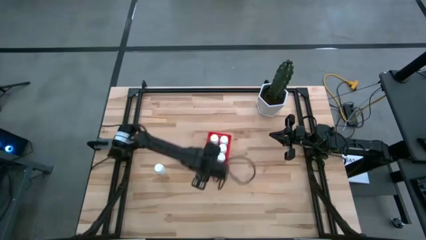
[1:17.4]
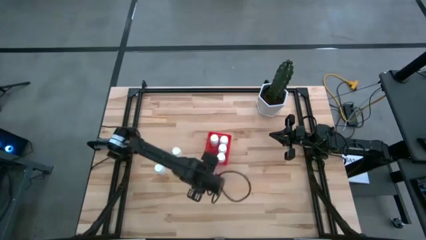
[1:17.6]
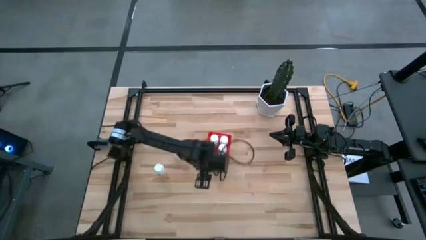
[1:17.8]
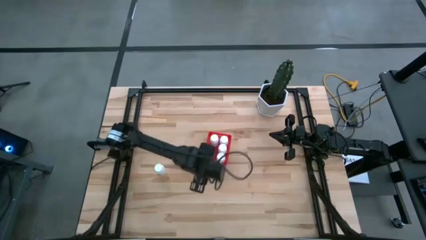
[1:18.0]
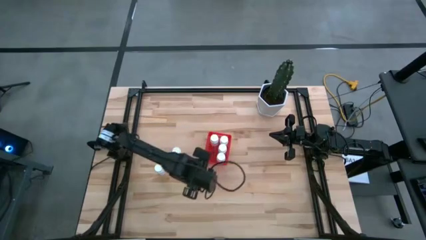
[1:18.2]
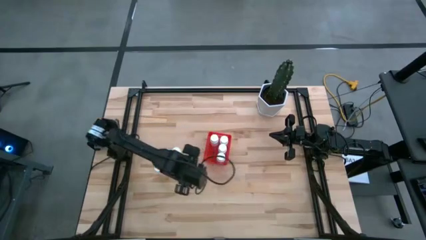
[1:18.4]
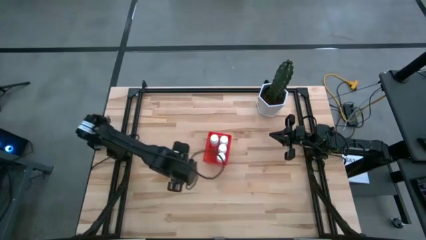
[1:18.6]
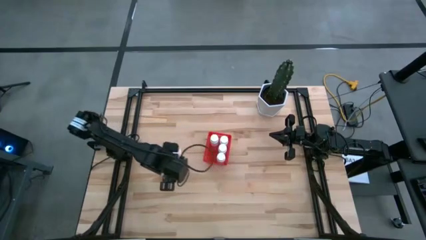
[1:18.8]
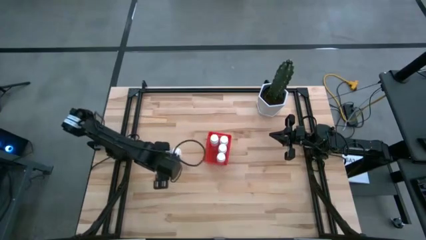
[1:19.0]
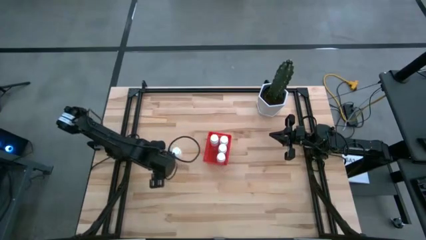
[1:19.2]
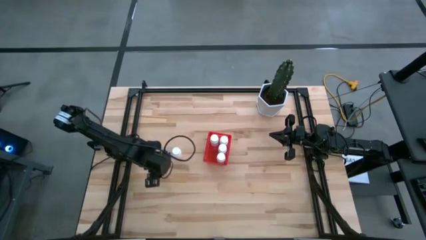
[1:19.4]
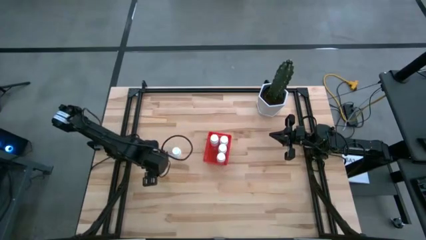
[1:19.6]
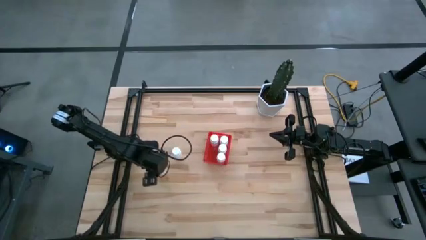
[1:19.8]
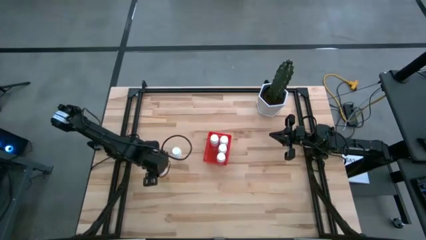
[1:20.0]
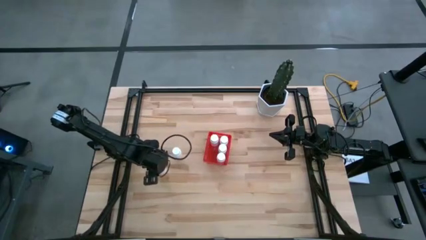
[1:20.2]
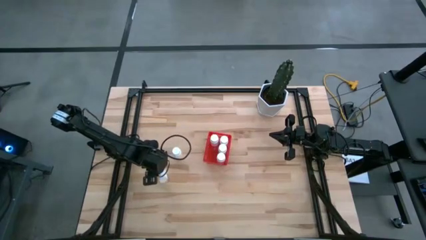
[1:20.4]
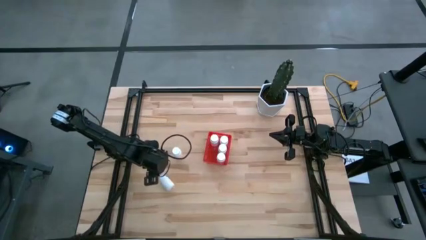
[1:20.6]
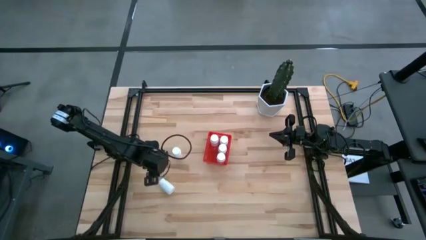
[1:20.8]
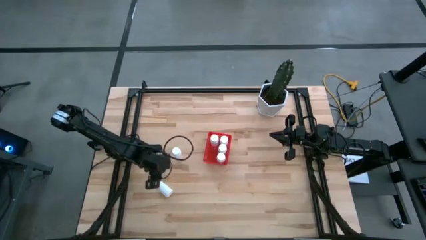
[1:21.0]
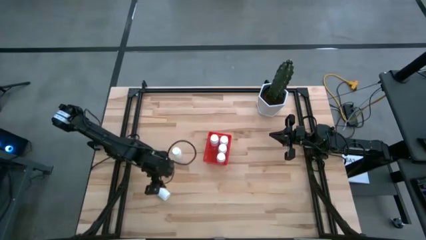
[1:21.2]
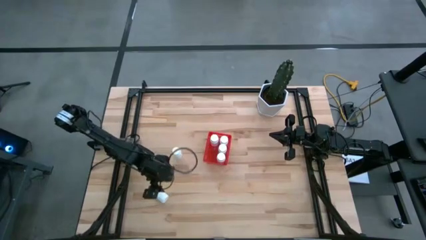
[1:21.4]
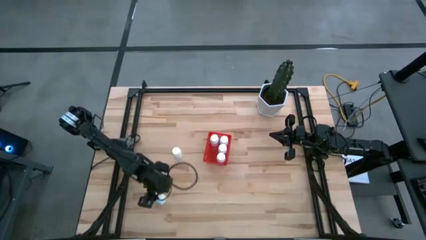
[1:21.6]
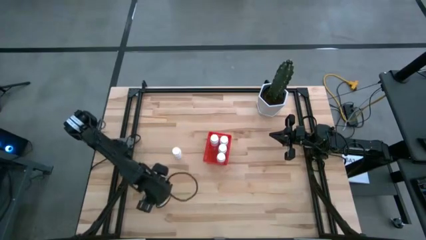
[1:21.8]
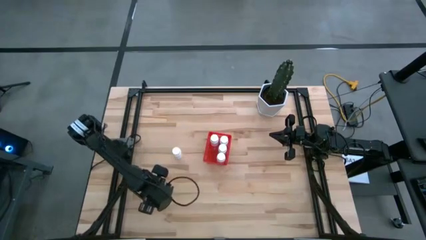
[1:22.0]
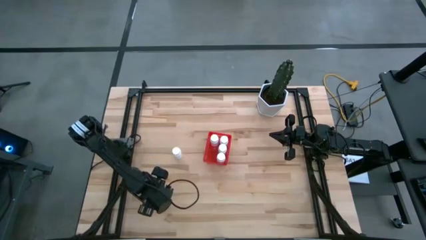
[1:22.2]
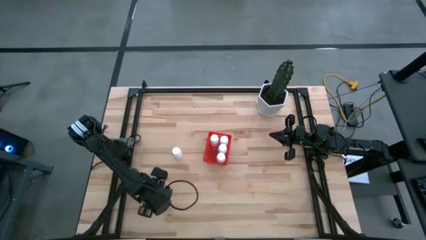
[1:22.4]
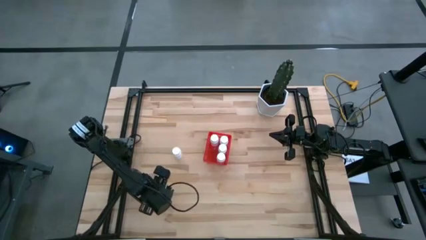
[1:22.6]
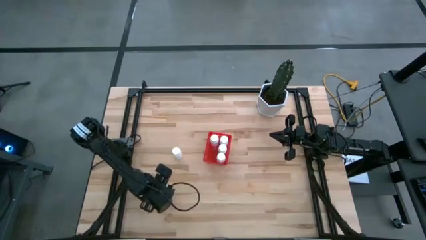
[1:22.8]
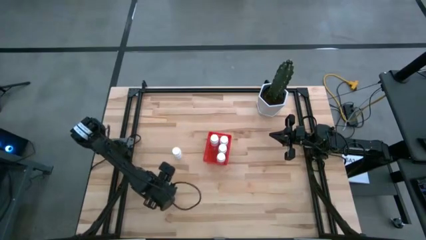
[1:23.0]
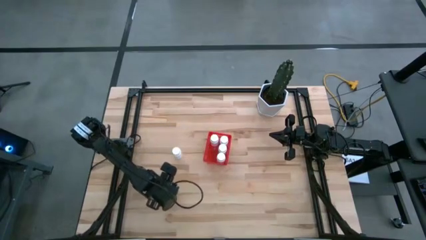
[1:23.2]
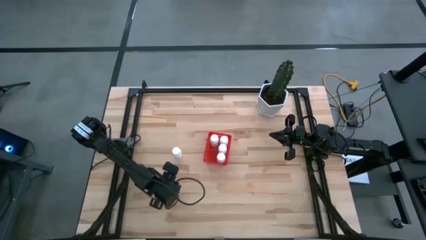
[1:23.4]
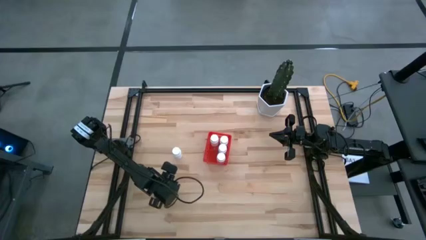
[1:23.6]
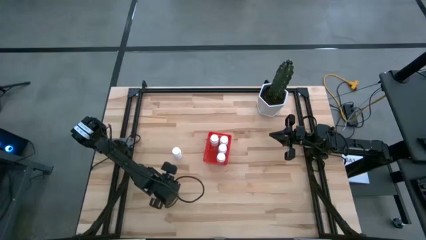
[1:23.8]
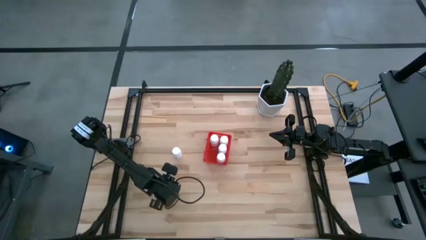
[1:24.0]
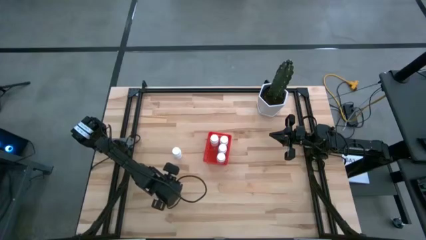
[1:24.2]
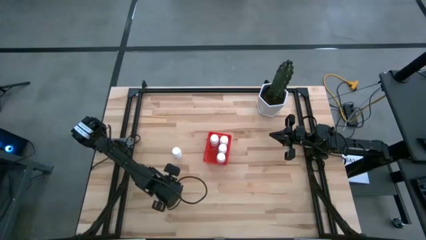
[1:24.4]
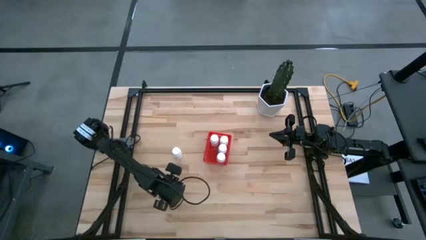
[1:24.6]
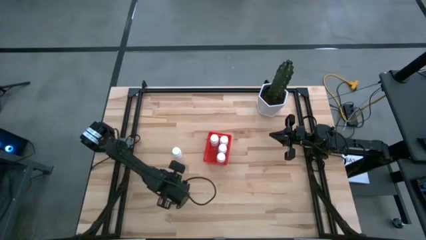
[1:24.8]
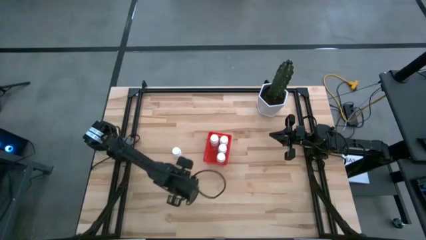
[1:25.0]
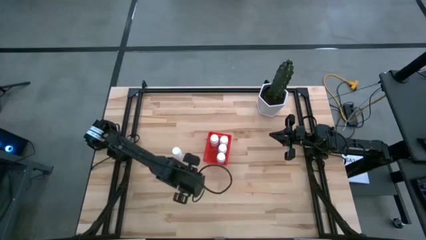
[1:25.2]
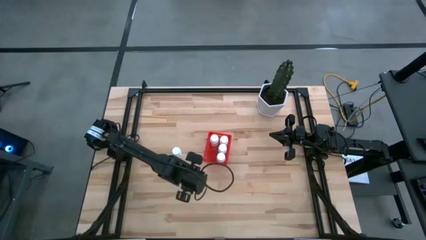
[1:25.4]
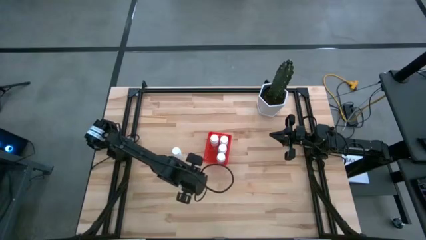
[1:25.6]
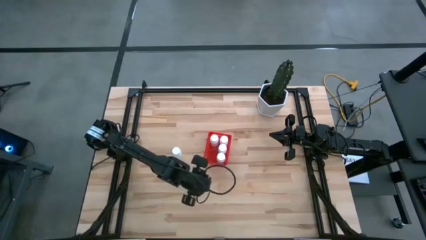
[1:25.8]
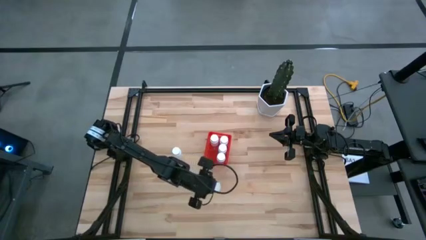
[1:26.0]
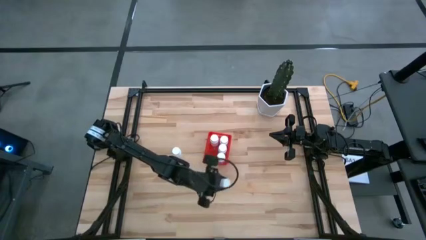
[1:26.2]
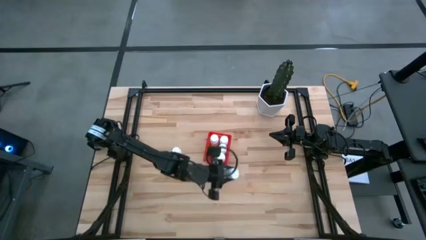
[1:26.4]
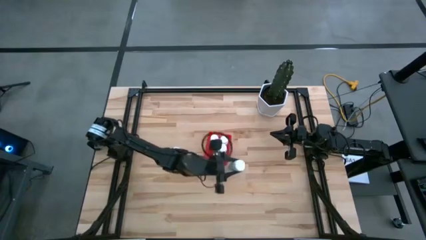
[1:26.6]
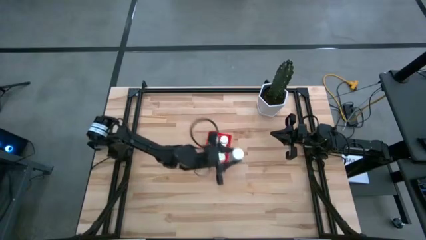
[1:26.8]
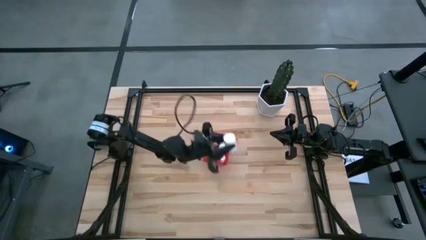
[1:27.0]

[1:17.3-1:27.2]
Task: Pick and place pill bottles into a basket
Put the left white pill bottle into the red bin
